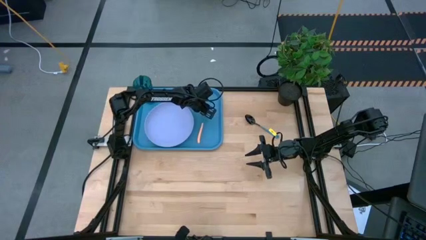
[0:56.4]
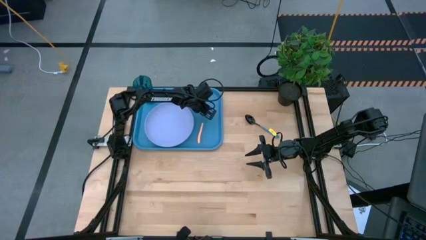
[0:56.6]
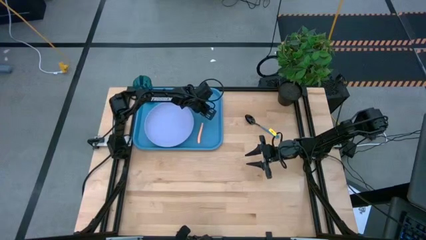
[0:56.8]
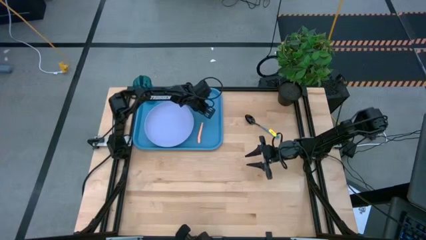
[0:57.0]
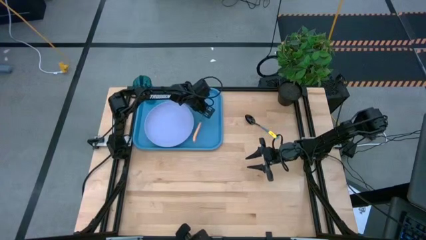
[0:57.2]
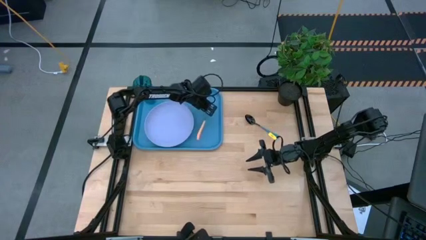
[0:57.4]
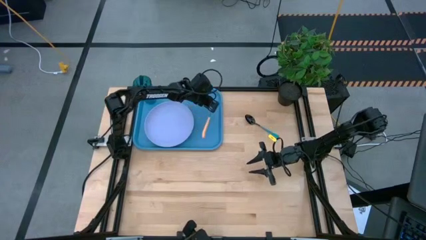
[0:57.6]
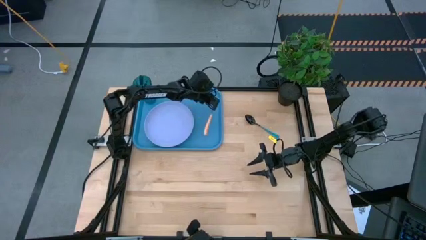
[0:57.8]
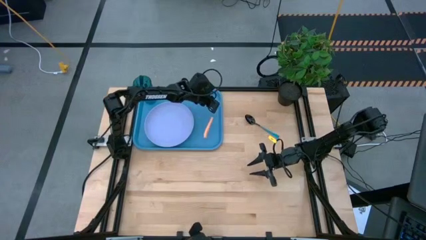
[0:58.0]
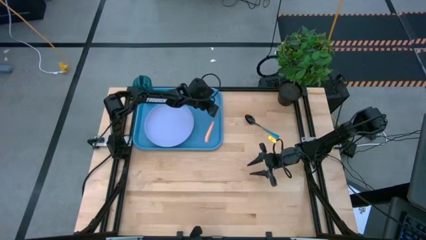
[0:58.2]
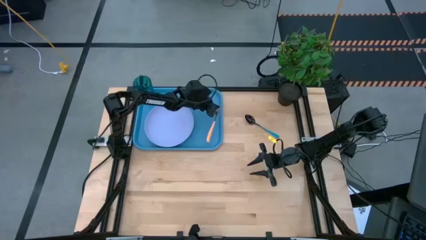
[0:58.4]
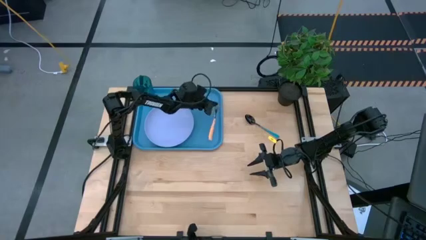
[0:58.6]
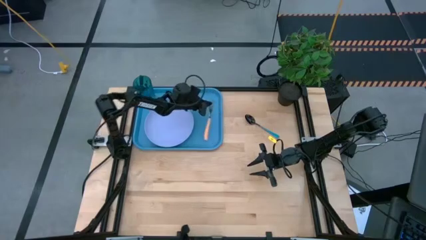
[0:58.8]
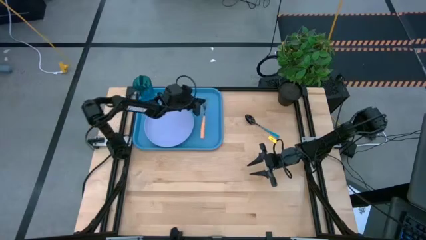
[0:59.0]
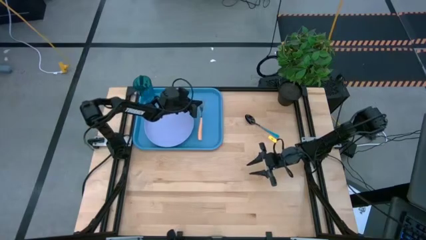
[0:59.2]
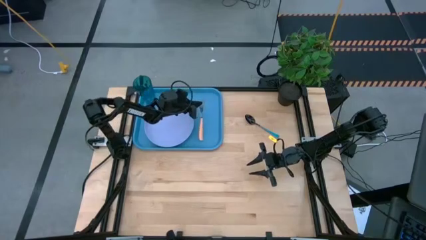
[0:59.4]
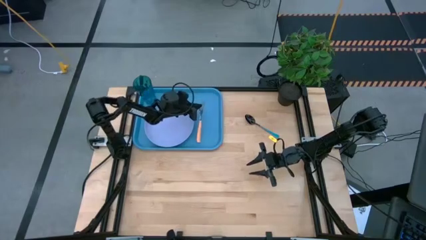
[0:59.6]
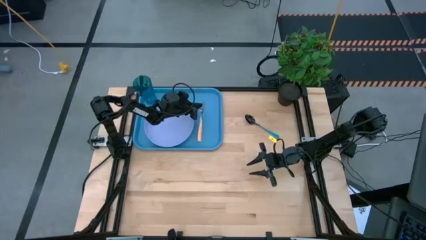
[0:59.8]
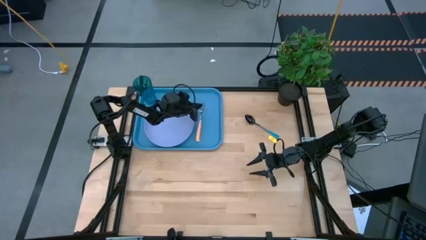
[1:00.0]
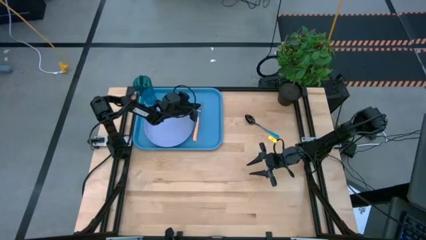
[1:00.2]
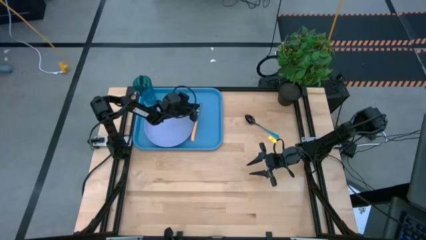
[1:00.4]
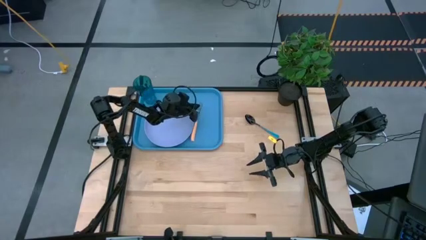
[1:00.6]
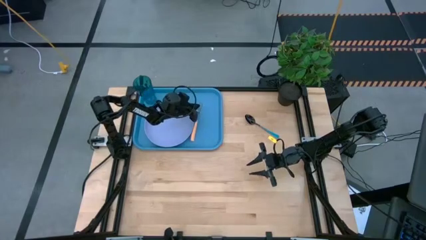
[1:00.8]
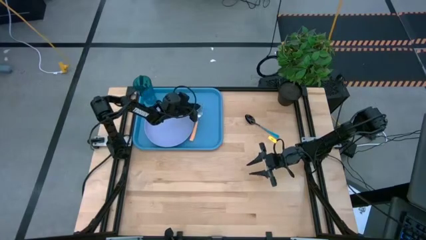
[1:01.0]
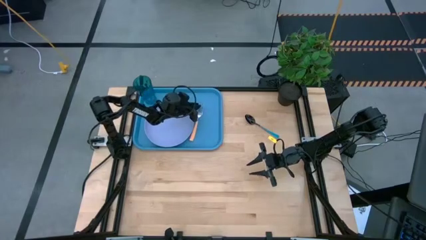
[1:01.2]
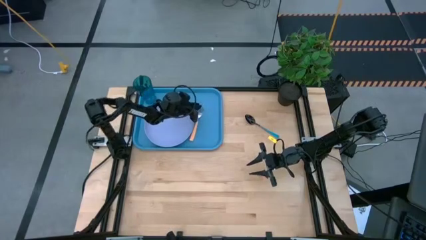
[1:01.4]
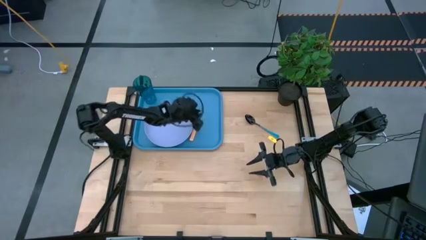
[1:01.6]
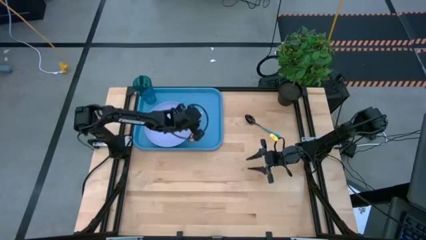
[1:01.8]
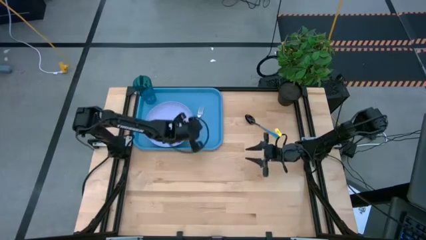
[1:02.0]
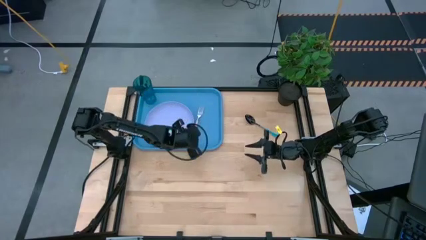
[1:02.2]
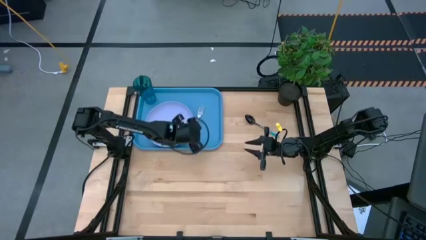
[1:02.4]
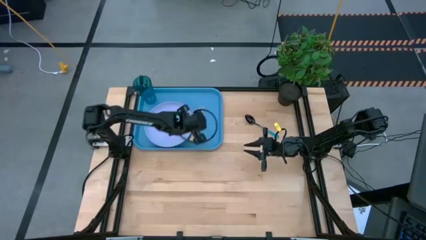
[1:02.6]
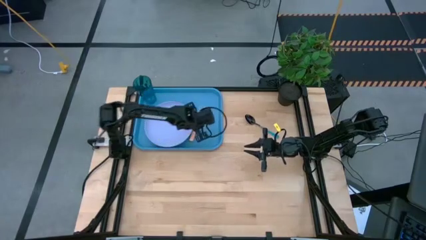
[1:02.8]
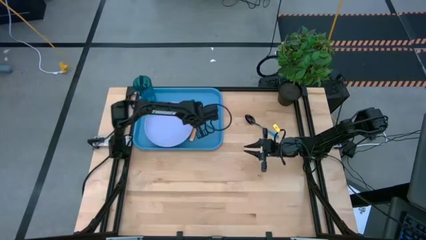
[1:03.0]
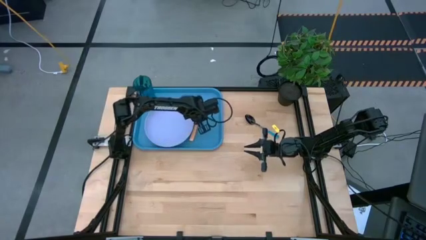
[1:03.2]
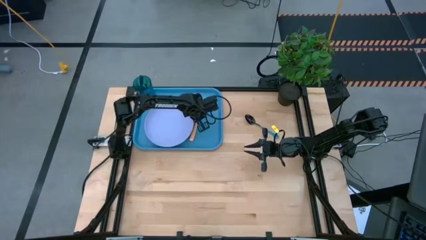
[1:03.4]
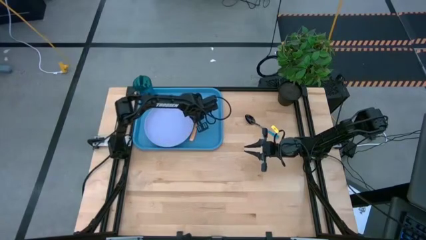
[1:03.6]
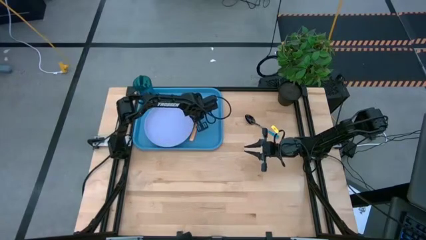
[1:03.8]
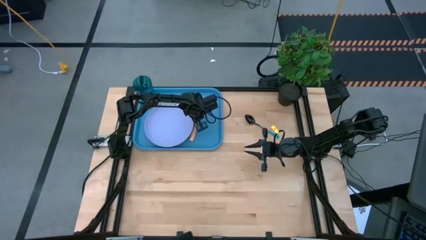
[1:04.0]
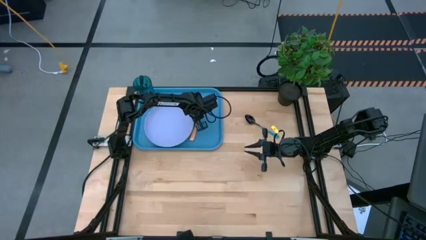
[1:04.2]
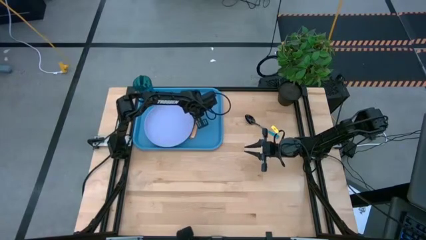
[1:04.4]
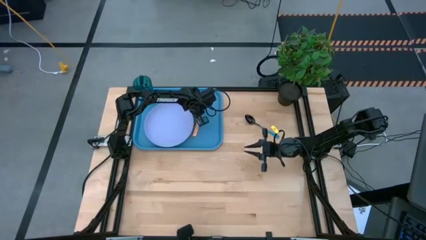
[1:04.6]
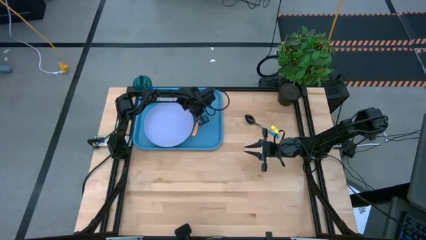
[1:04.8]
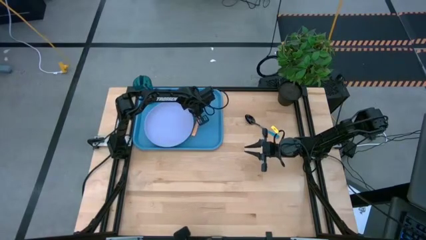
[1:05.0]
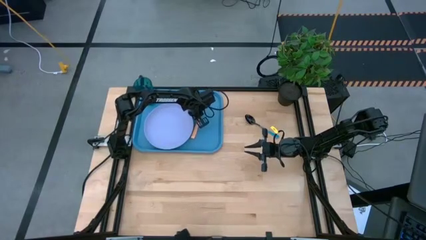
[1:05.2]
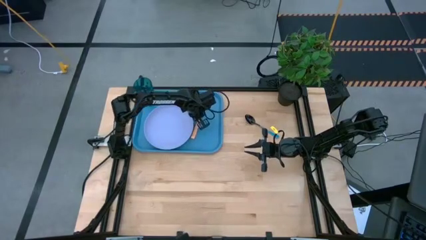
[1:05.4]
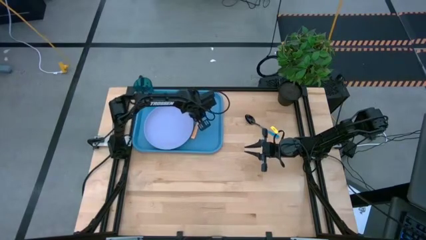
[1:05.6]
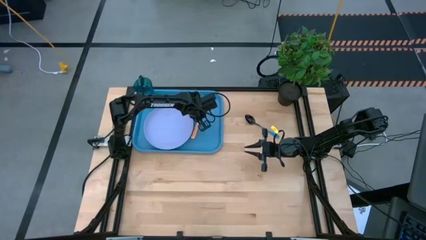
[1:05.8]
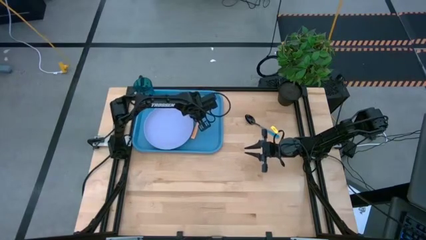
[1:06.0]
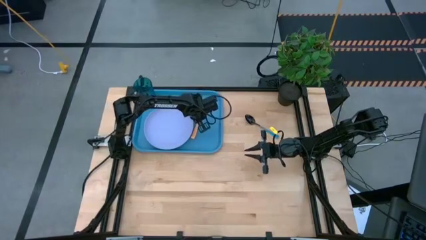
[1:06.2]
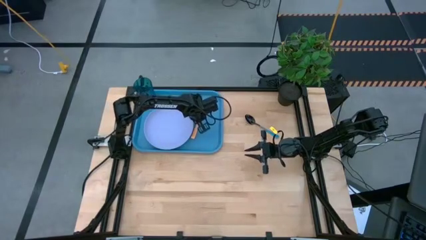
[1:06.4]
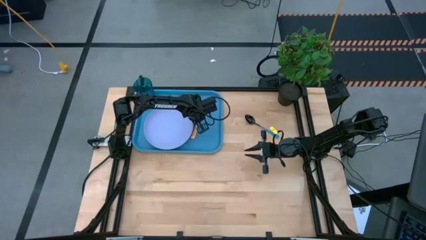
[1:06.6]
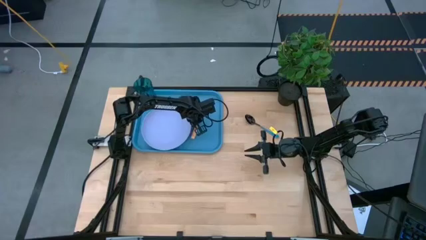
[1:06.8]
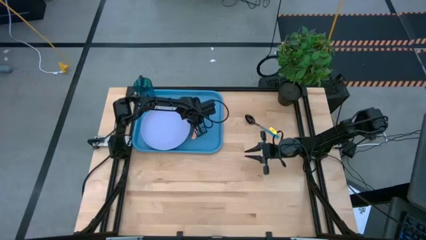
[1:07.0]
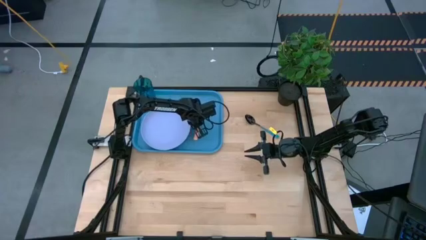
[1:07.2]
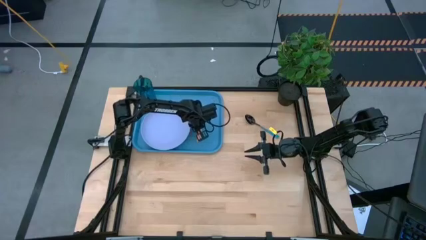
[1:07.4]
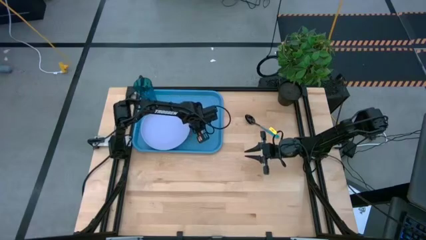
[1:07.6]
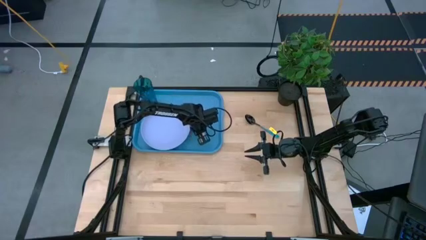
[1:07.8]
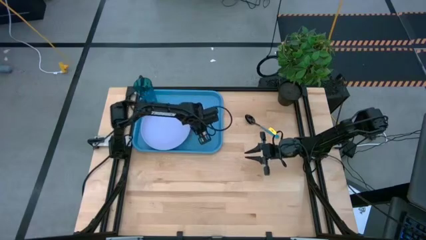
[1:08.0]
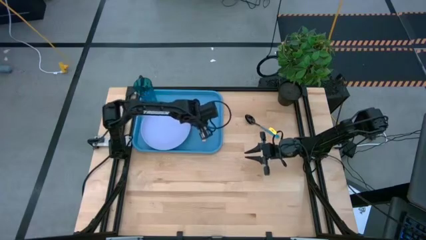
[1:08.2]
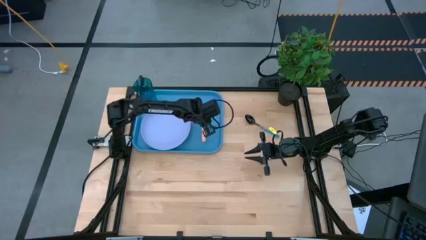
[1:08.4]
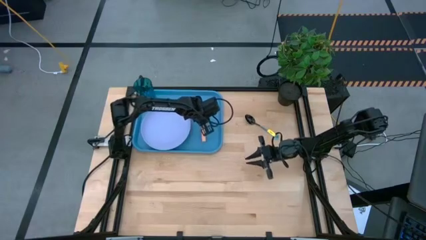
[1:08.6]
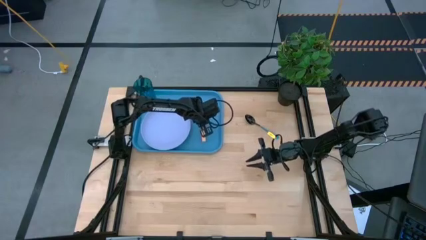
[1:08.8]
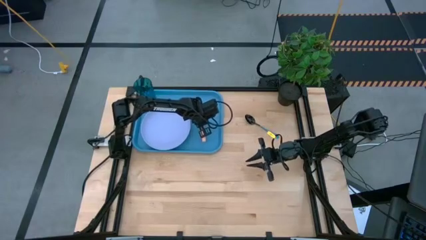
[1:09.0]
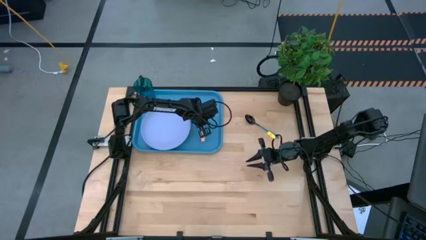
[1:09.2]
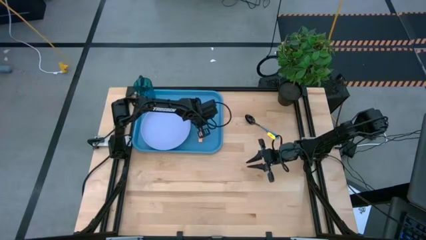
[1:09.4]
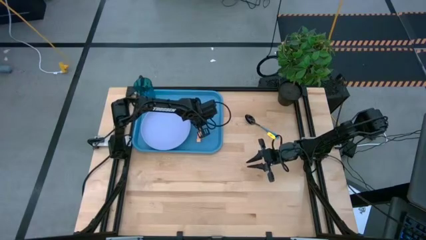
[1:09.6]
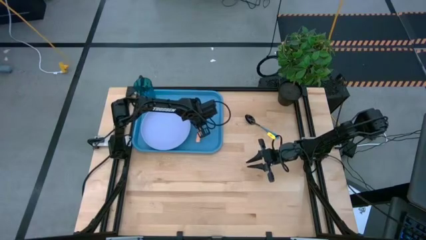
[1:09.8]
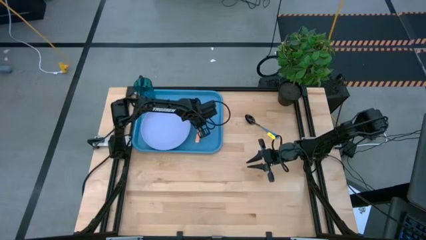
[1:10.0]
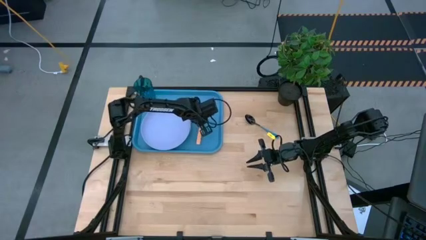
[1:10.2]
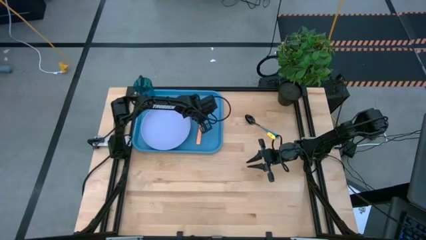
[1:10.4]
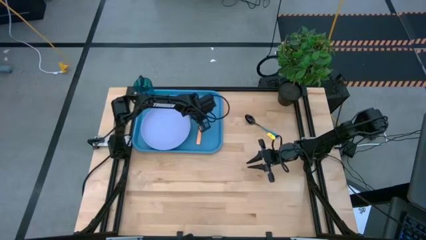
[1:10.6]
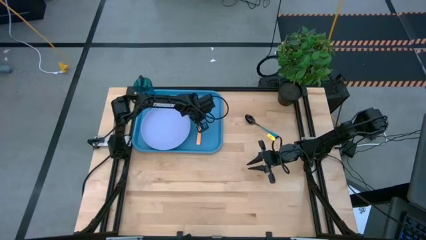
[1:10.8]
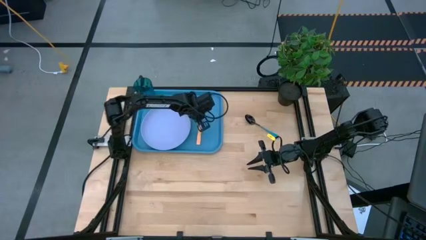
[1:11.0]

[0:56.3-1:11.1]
Task: Pick and place plate/cup/fork/spoon on tray
Put the orange fork on the blue tray to the right of the violet plate

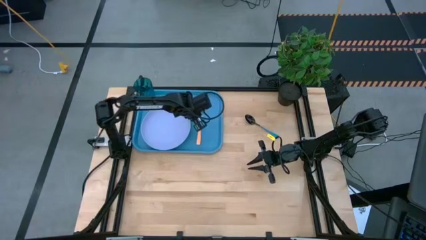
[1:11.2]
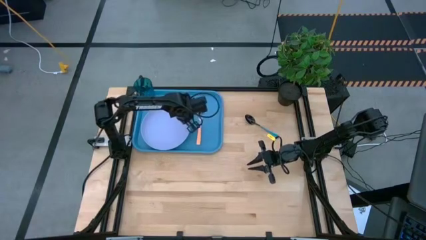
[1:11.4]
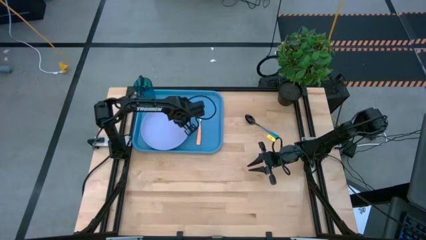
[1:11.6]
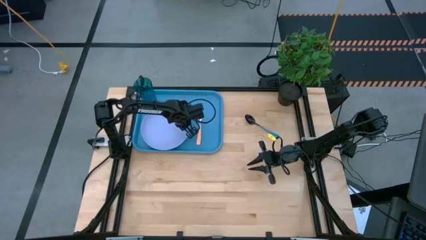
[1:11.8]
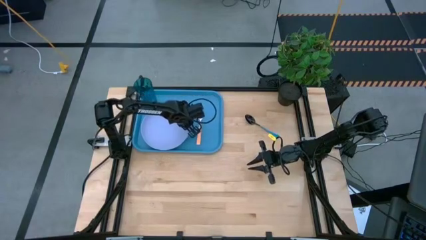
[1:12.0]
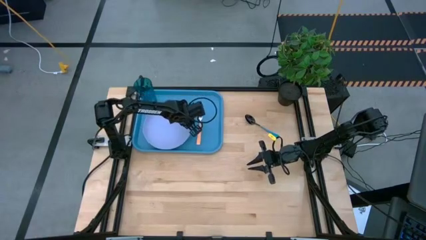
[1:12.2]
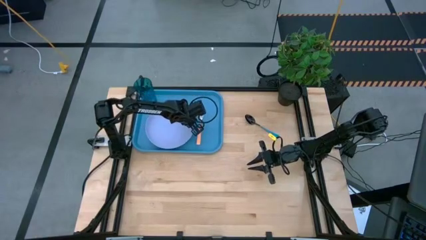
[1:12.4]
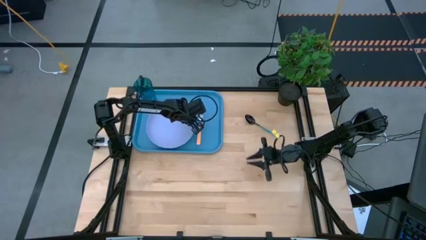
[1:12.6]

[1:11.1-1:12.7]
Adjust the violet plate
